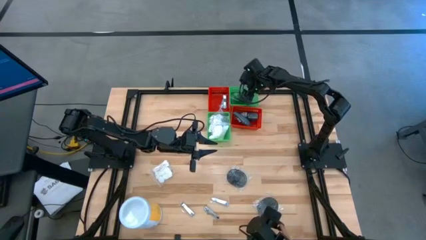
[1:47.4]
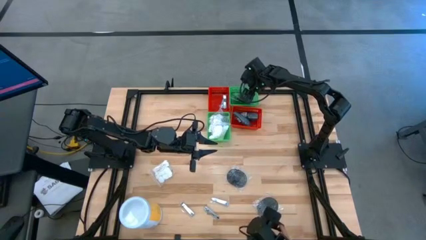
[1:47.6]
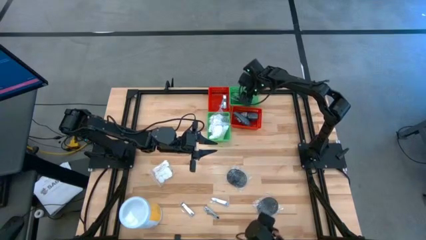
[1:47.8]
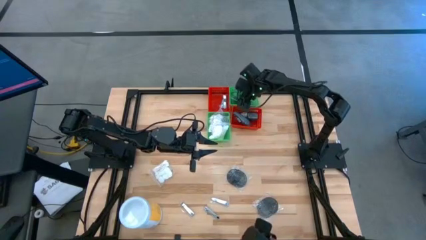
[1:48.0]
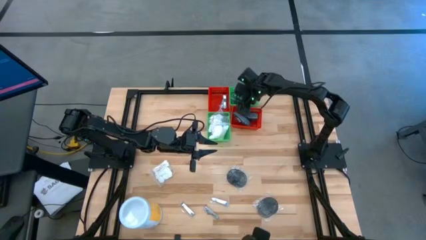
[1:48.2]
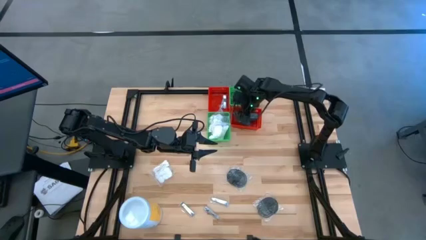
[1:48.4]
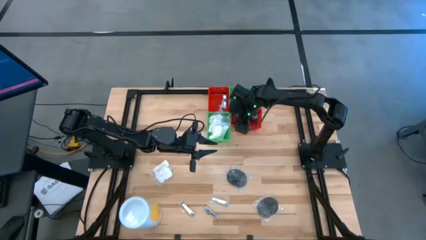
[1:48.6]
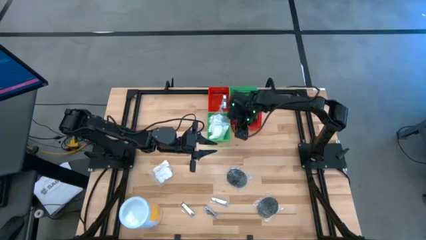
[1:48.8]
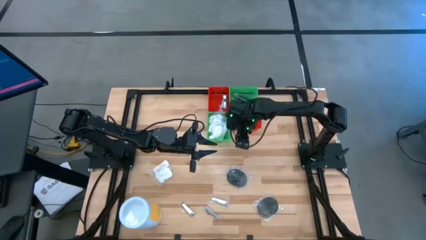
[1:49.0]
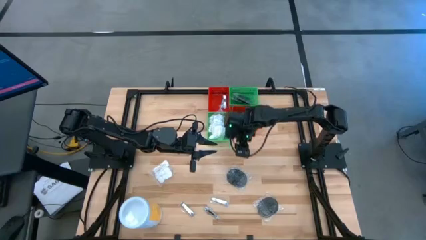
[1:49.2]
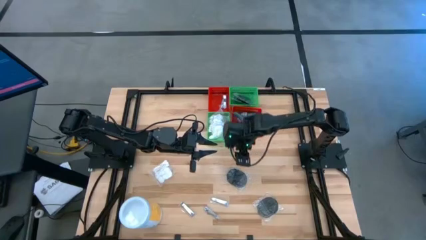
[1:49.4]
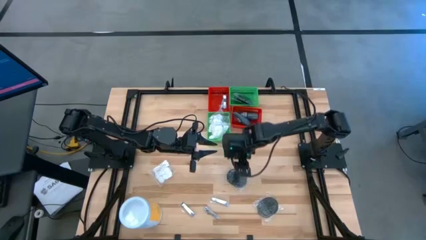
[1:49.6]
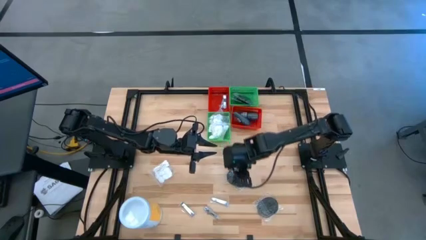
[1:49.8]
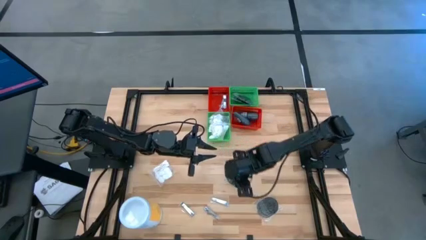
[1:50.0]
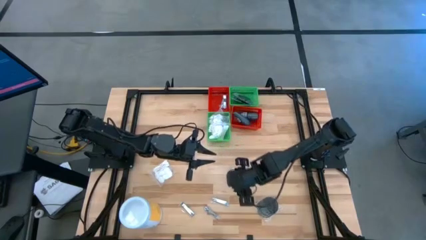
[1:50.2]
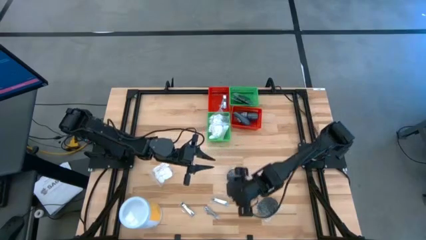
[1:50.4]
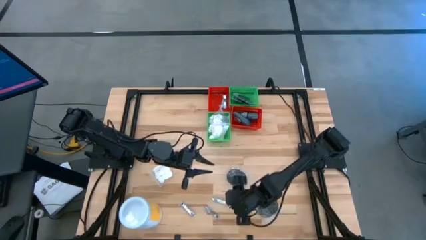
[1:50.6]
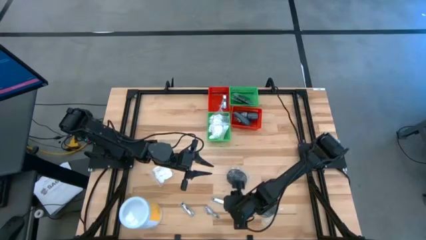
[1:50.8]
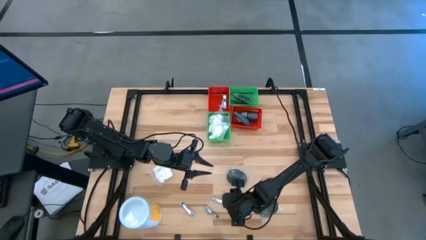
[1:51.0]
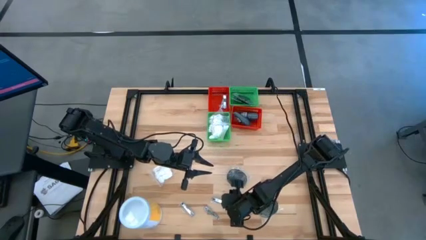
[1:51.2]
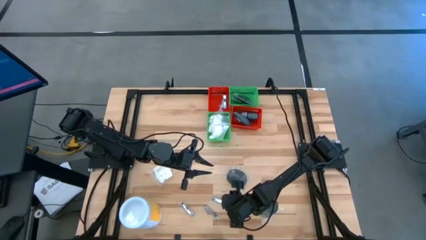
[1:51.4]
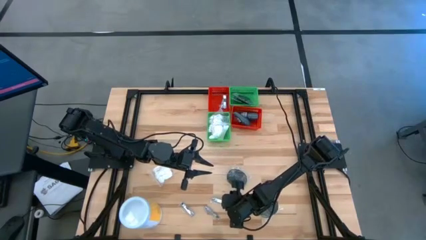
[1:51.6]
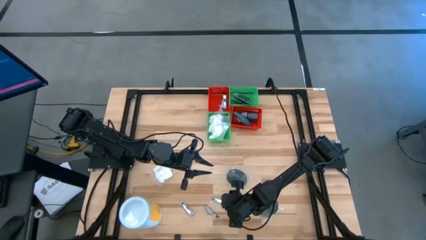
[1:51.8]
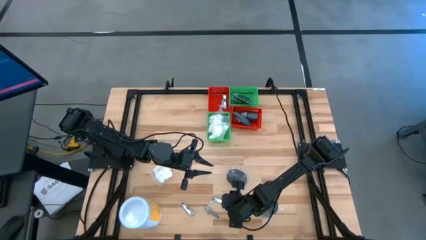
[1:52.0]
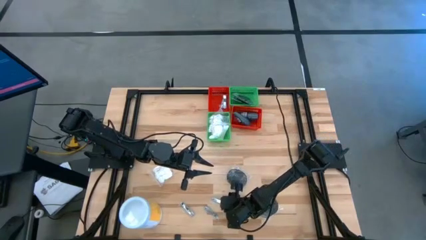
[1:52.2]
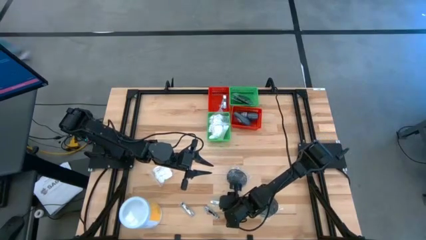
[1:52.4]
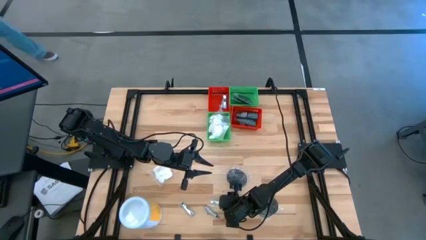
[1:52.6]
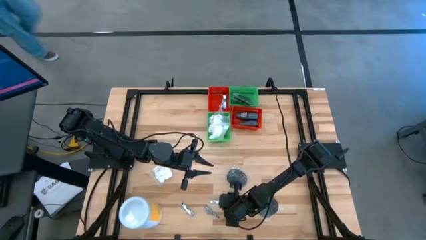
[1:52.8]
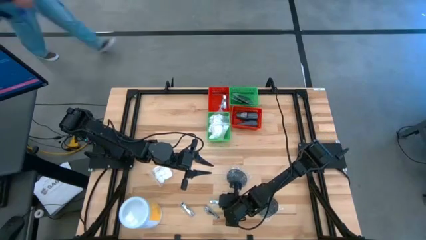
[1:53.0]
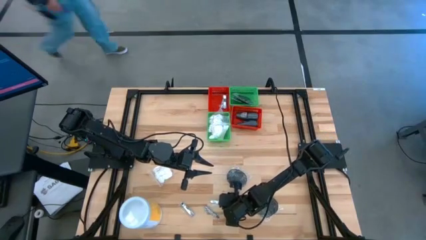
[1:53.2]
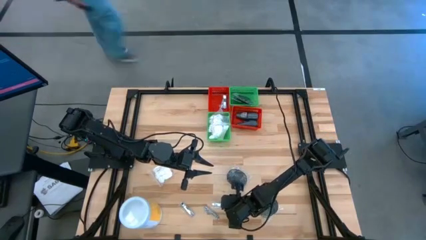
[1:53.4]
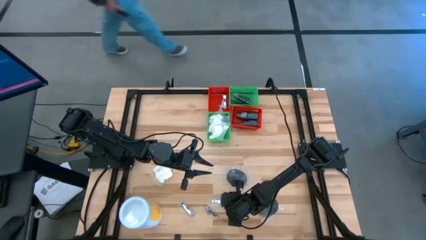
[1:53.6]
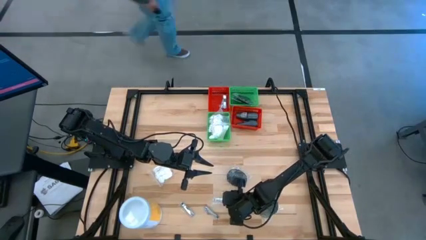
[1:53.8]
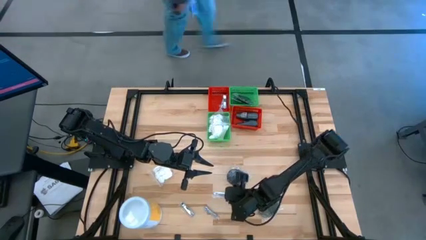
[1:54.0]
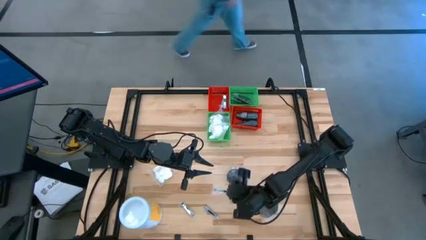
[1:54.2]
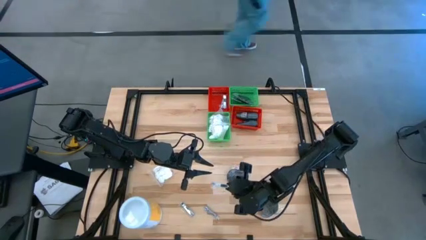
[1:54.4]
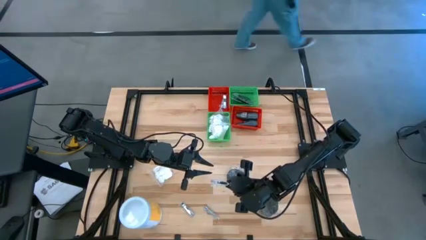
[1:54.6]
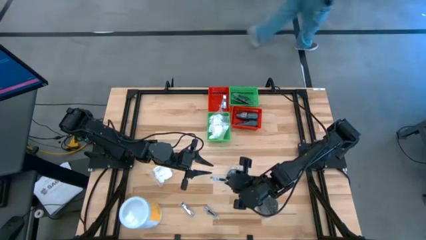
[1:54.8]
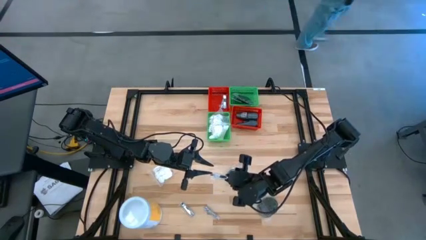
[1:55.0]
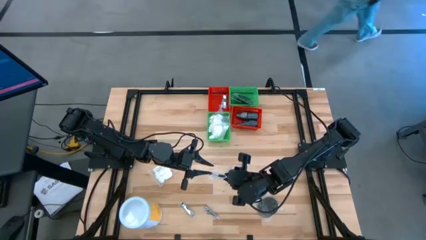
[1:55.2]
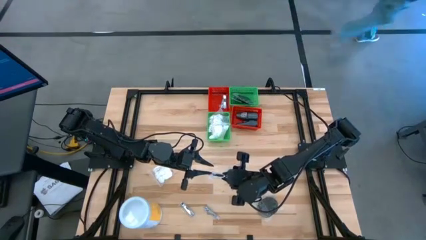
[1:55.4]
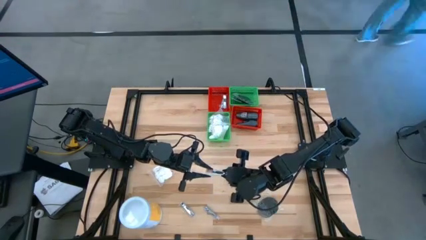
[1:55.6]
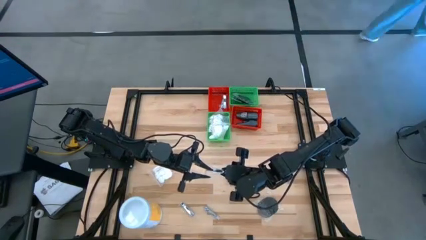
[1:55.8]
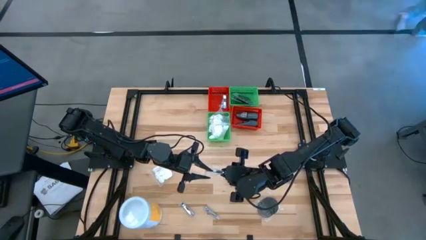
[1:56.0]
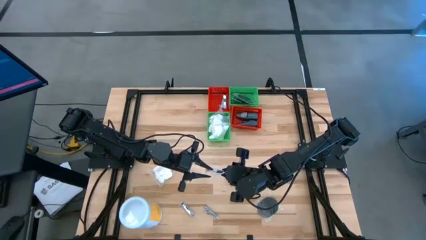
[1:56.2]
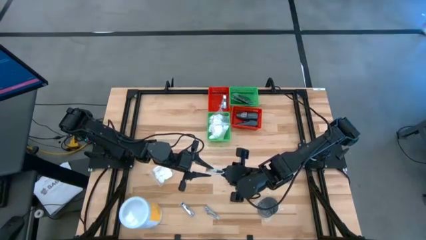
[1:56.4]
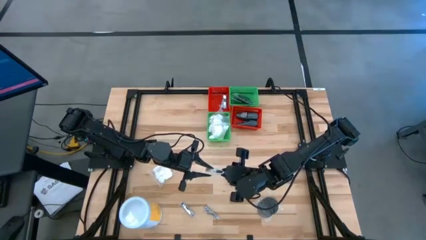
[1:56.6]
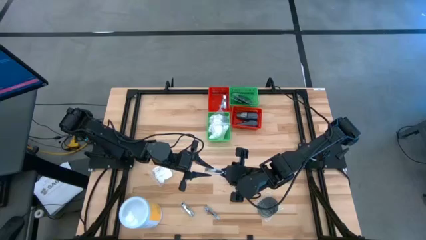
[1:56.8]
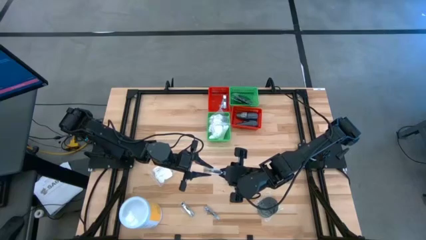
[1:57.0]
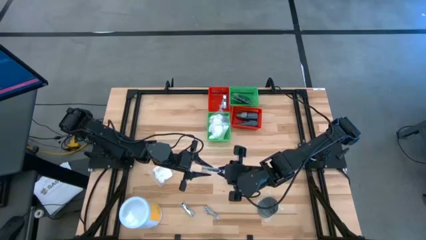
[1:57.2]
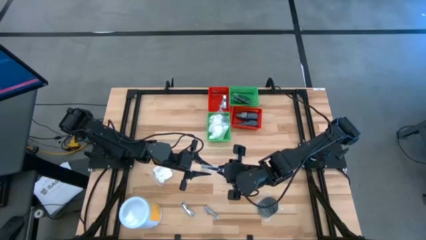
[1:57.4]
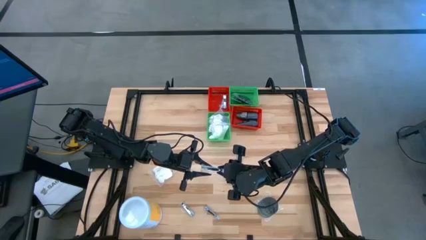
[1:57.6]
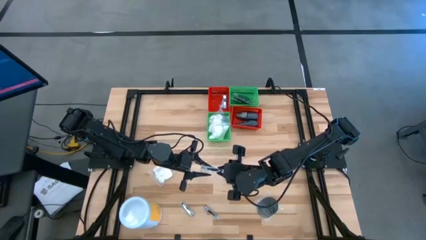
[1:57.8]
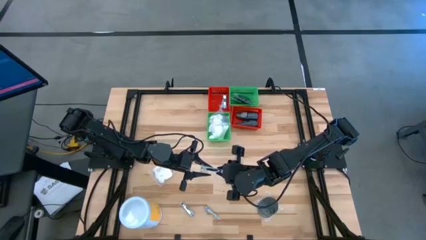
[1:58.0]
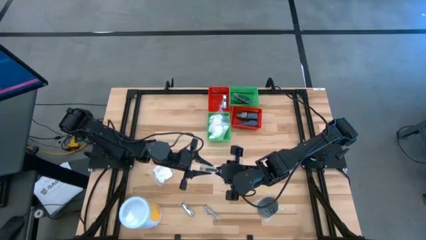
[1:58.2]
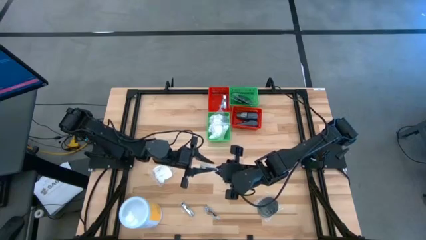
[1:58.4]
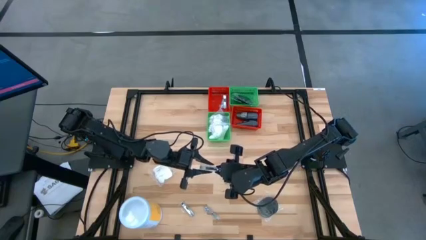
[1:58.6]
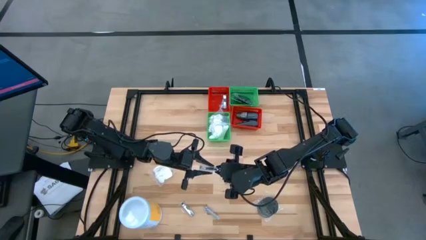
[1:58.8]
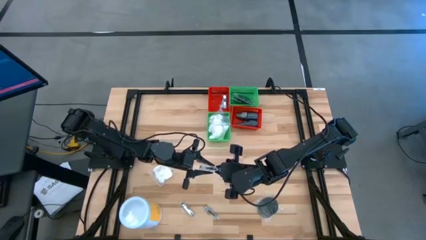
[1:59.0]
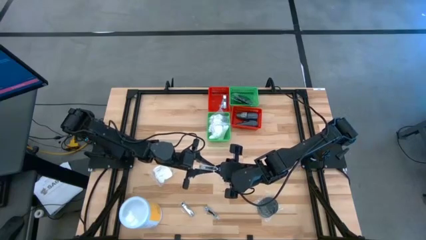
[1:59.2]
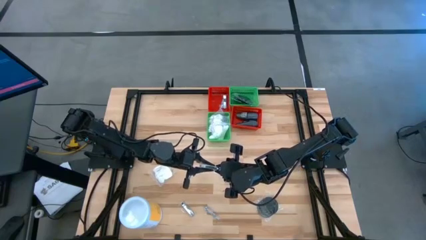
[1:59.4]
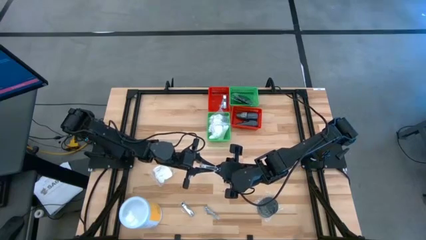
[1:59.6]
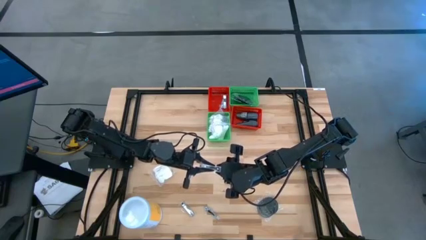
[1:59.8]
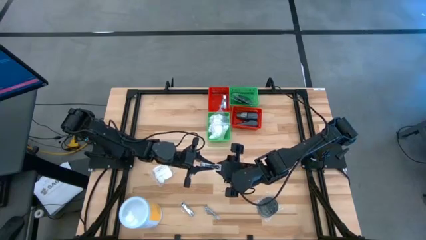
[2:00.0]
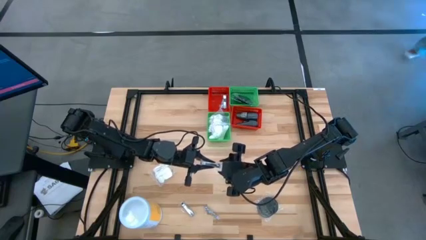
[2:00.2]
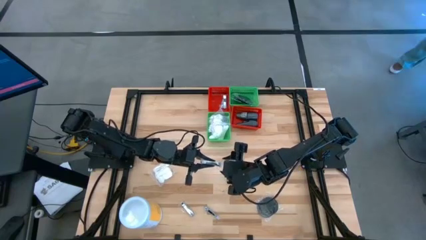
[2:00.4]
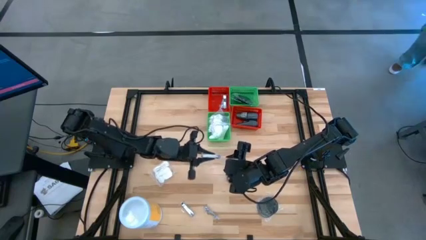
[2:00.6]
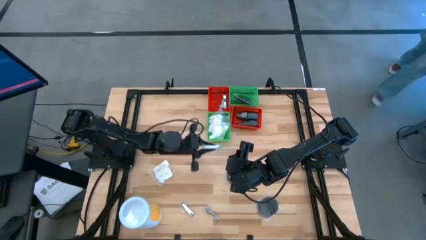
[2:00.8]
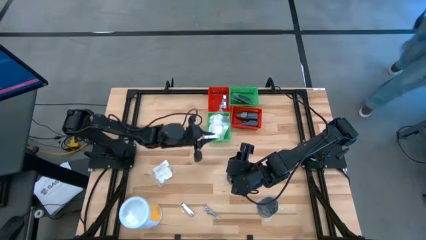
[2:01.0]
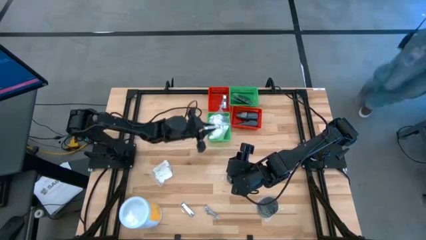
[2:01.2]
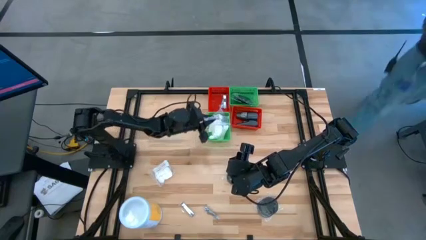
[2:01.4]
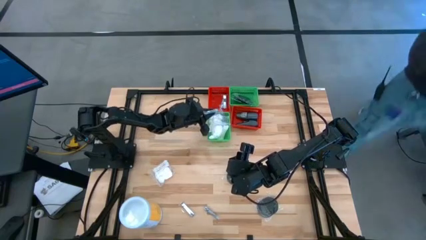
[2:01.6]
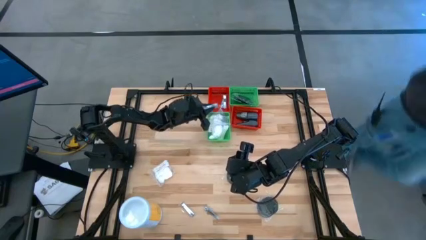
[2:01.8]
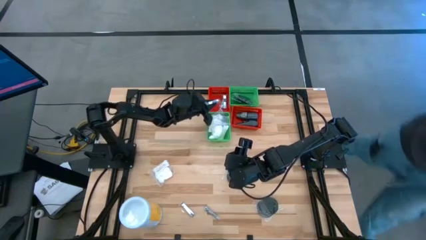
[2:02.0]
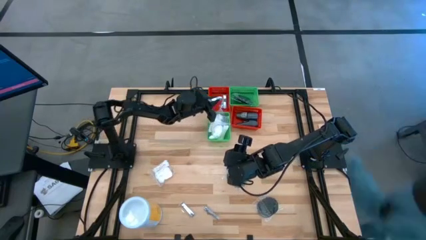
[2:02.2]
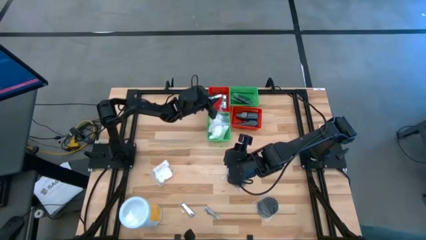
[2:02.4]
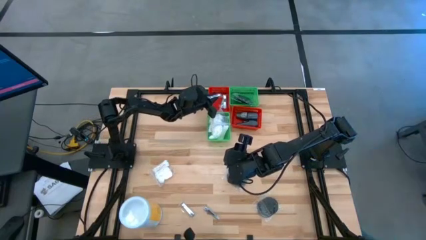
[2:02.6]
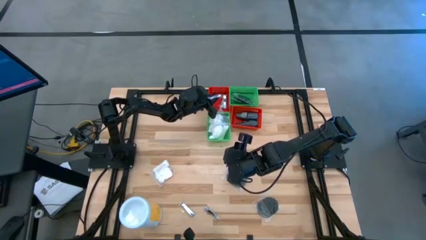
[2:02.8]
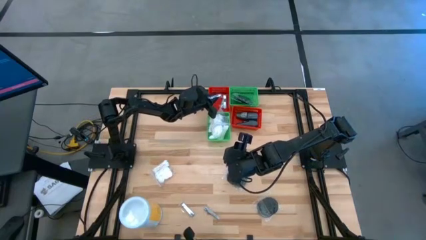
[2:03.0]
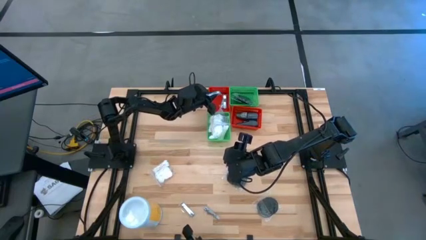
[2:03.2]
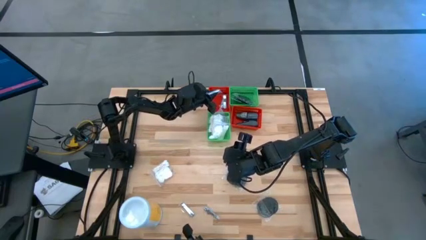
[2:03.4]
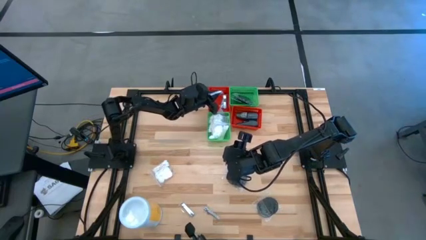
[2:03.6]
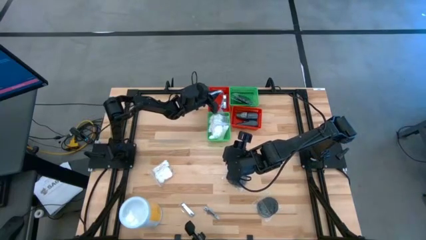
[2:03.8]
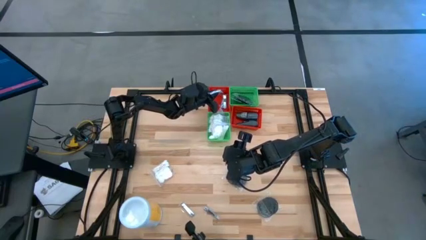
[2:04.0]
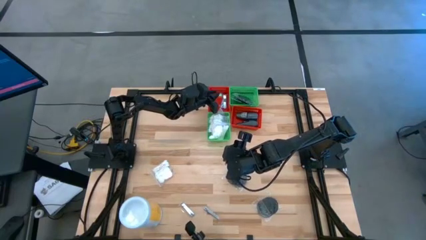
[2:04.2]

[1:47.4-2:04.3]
Task: Pick & Place Travel size toiletries
Put the nail cutter into the left red bin
